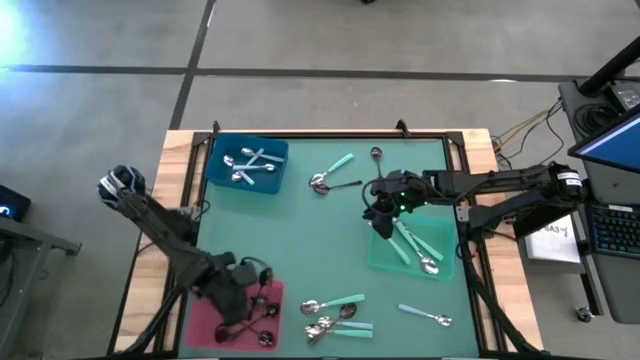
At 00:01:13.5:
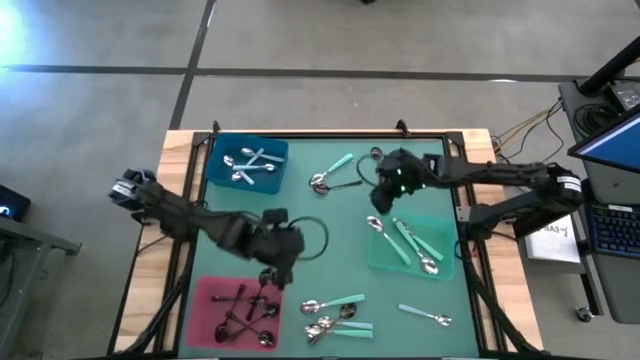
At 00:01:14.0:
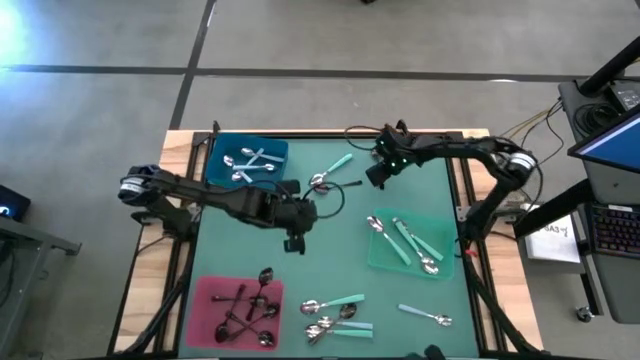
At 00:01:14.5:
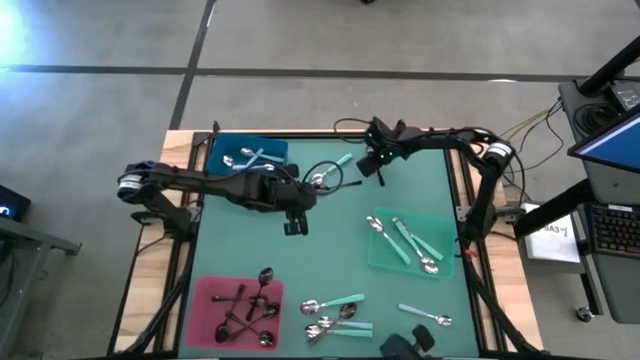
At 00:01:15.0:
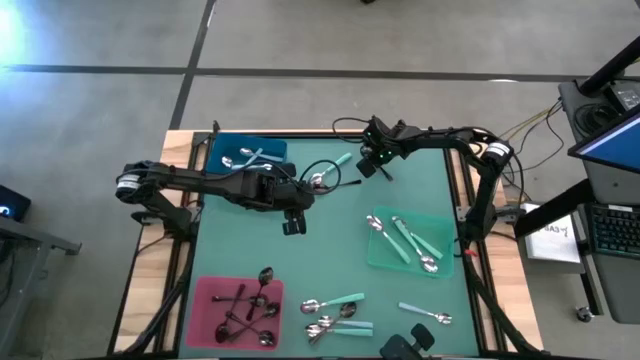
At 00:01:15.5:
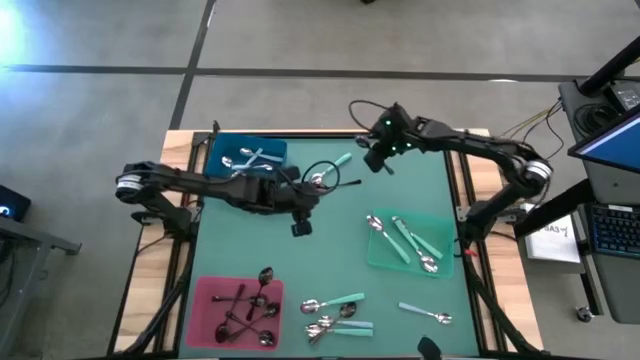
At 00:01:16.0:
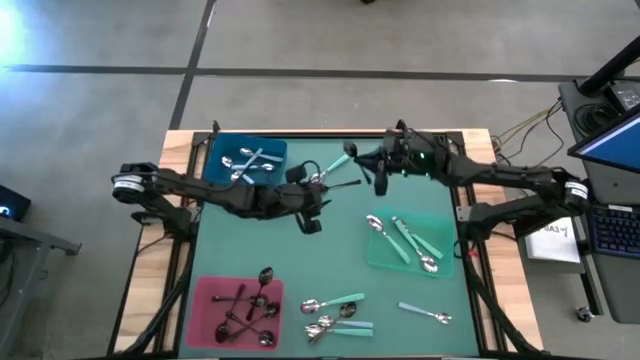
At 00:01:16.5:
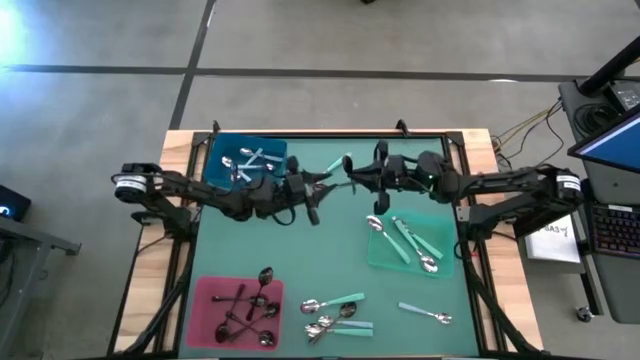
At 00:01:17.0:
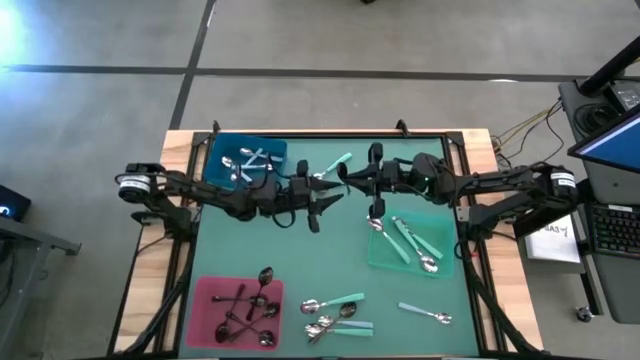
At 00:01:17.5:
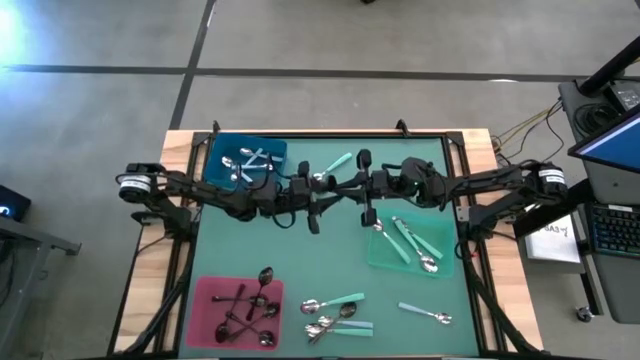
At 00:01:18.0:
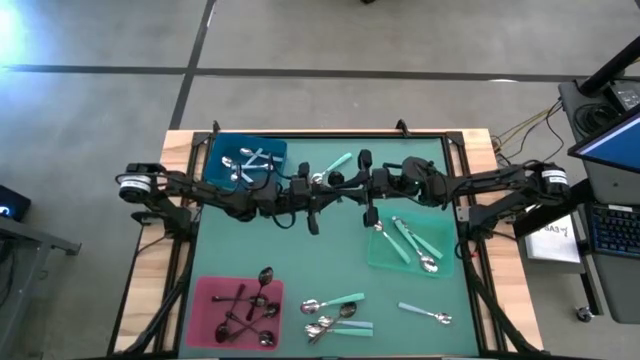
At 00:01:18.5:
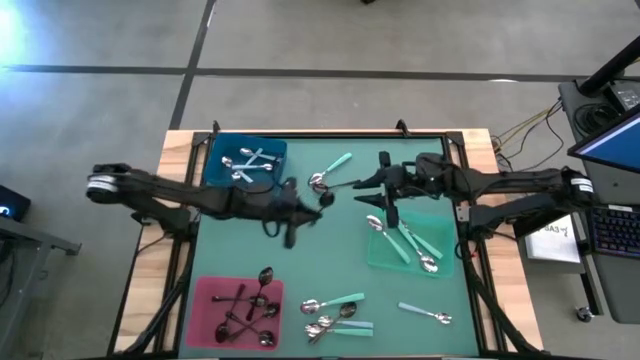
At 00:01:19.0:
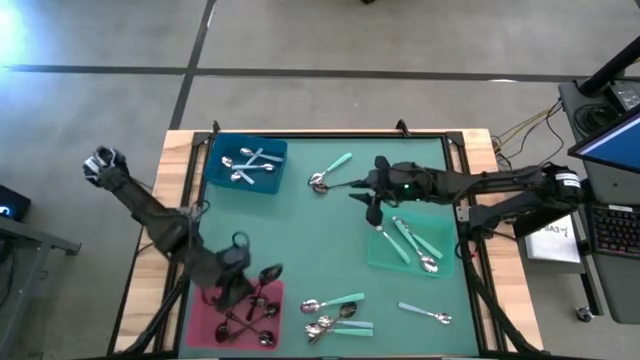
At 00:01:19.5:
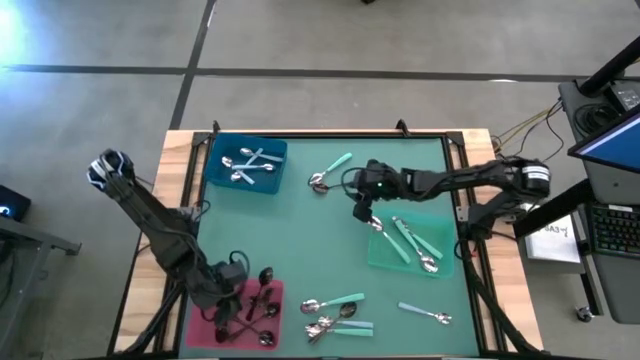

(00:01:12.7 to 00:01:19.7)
Task: Sort silverware by color (type)
Put the top black spoon into the pink bin

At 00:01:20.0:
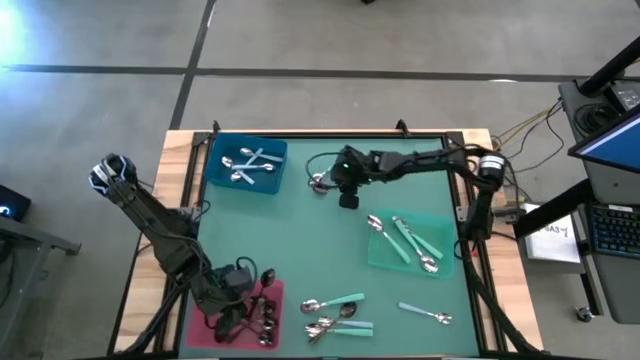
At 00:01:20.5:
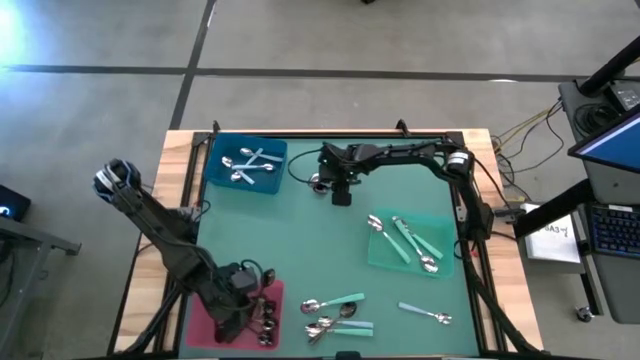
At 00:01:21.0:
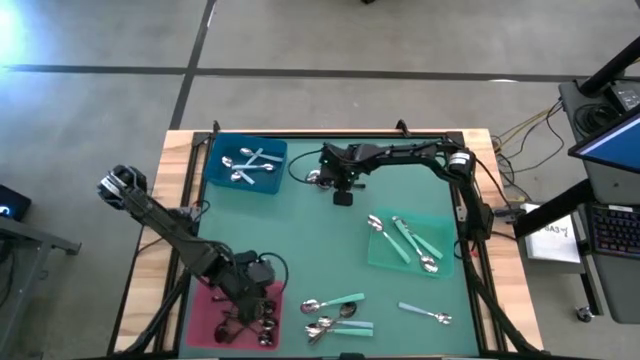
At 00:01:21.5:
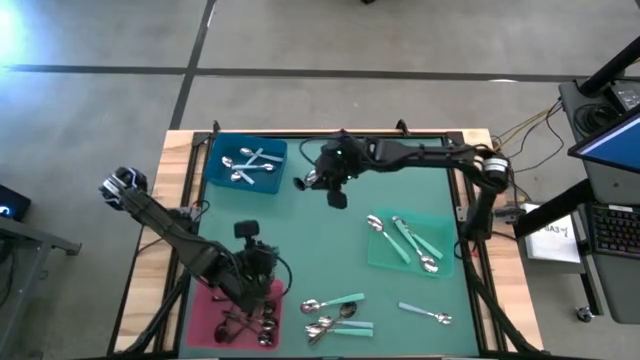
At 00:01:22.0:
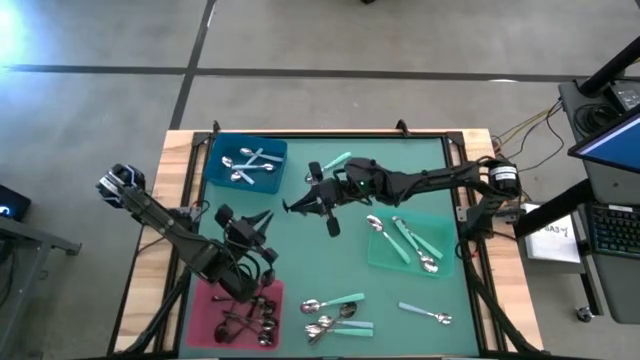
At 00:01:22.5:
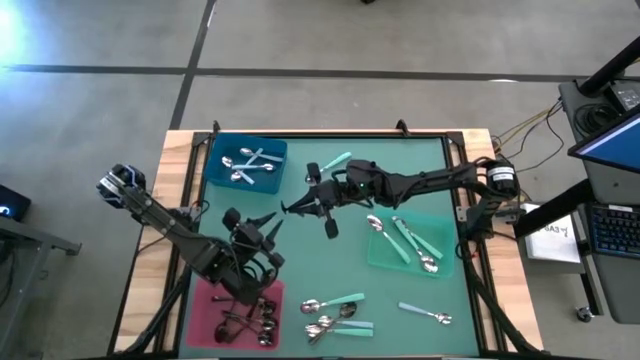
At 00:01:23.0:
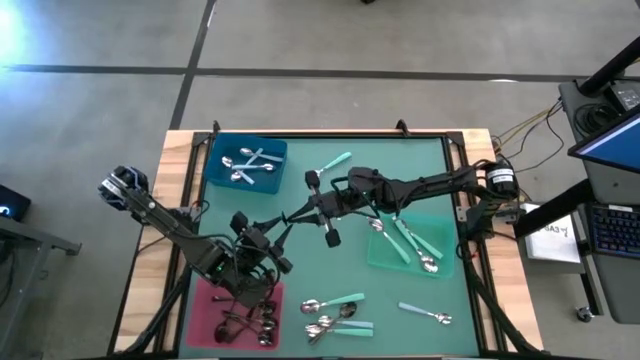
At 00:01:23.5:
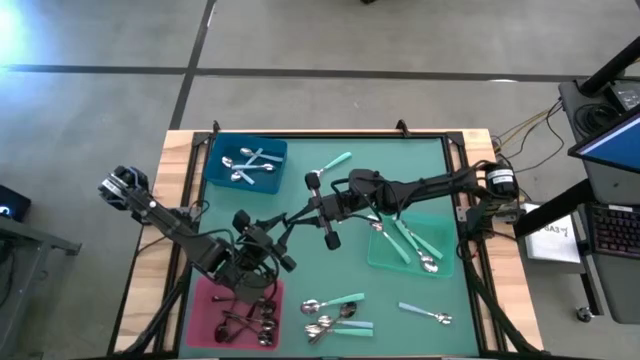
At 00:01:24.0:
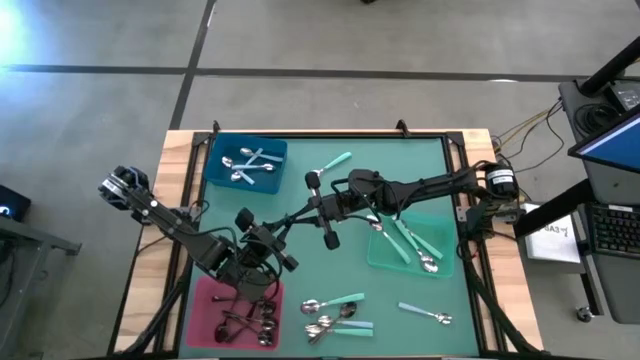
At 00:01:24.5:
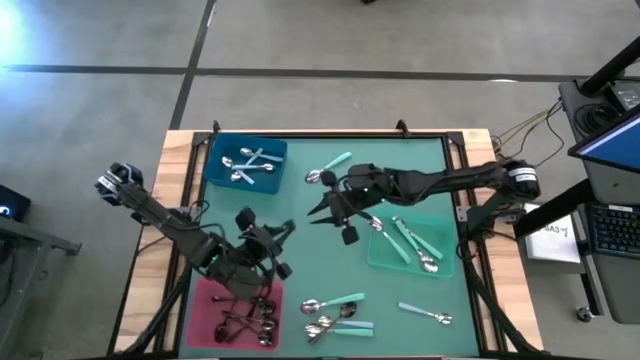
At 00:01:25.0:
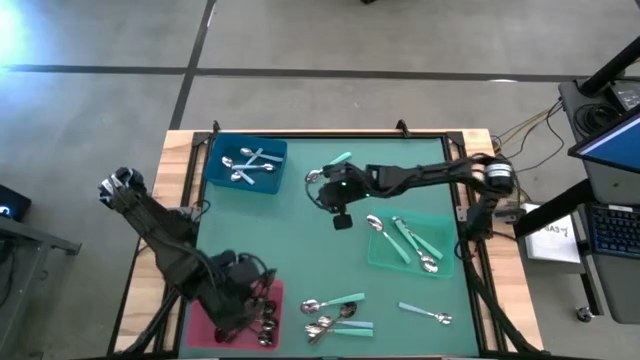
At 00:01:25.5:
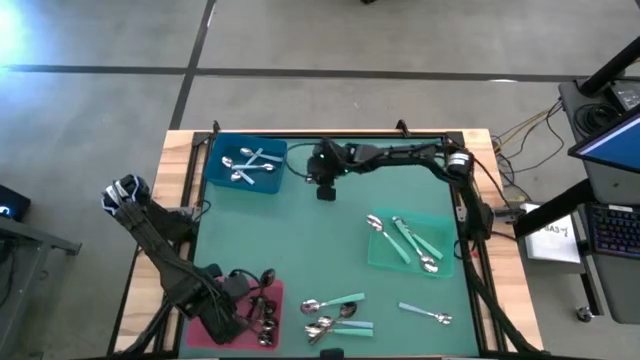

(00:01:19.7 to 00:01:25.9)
Put the top black spoon into the pink bin

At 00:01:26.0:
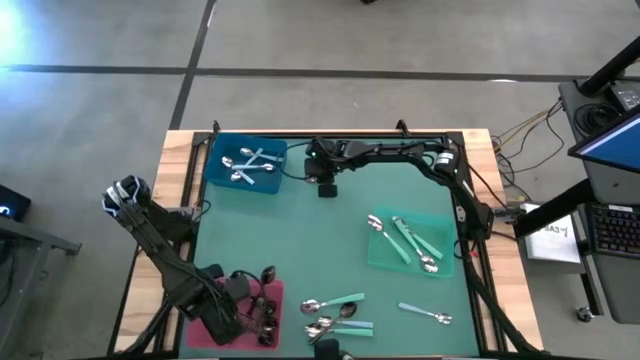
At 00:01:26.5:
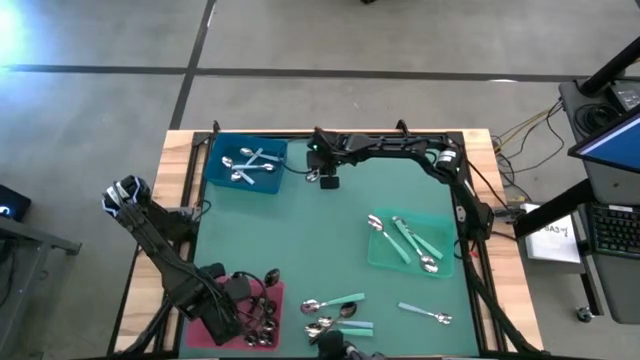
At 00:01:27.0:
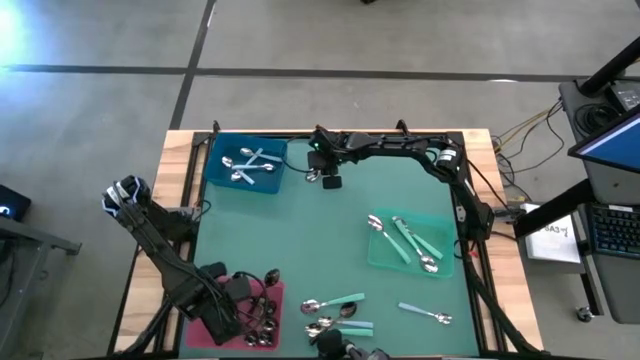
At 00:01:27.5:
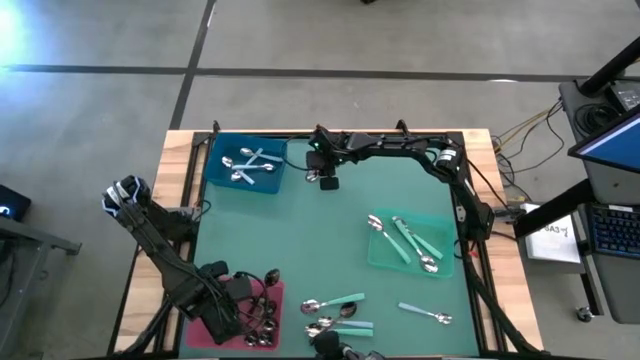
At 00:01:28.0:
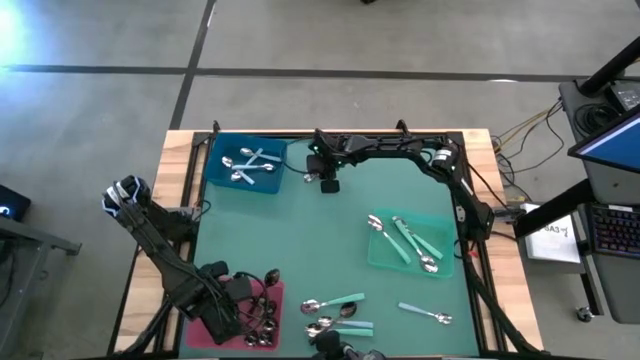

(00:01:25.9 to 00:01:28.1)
Put the green spoon into the blue bin

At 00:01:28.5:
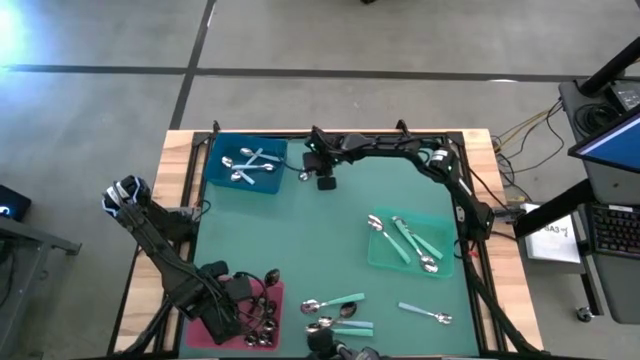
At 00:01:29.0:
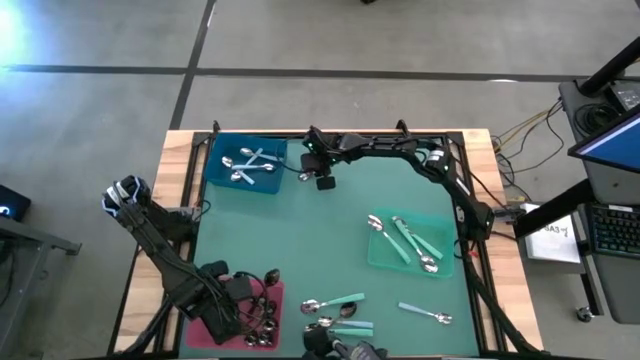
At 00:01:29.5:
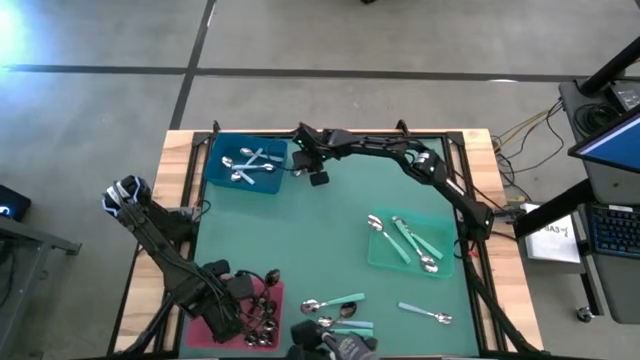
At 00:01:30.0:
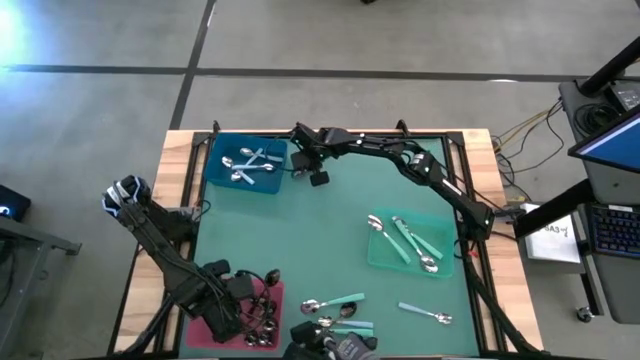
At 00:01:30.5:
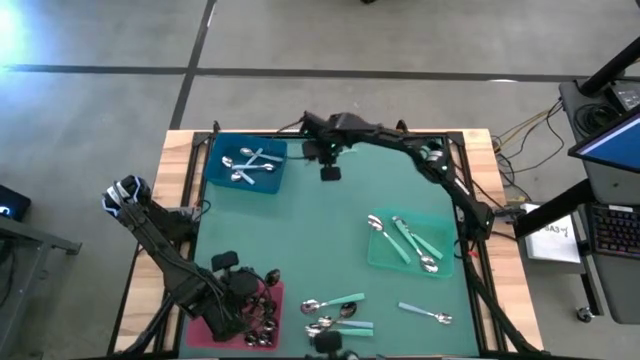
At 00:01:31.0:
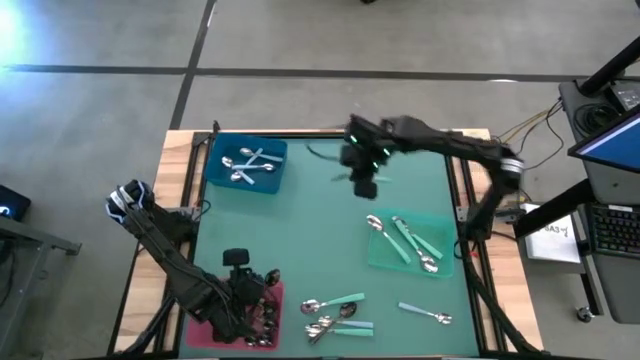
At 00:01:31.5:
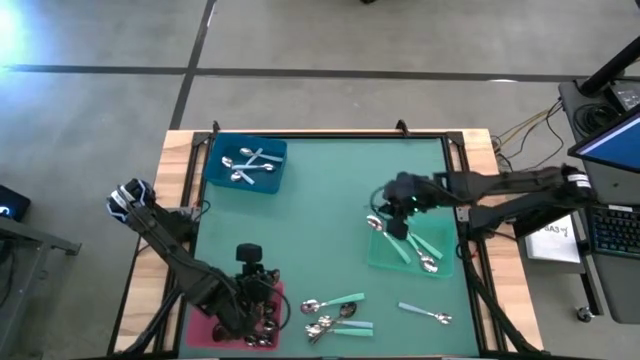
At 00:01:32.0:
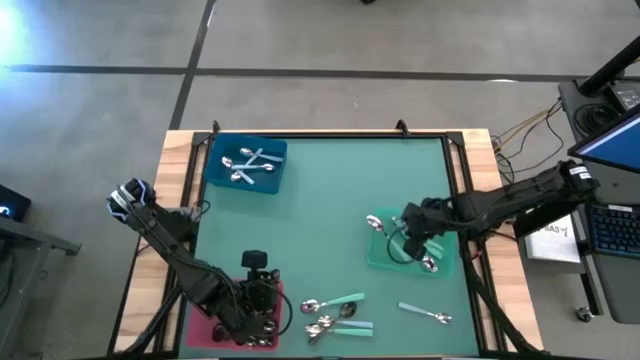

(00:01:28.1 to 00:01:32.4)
Put the top green spoon into the blue bin

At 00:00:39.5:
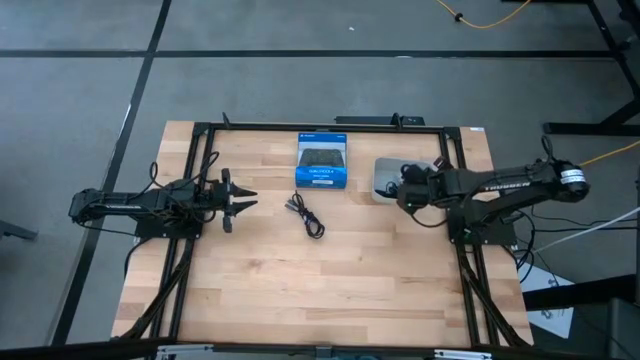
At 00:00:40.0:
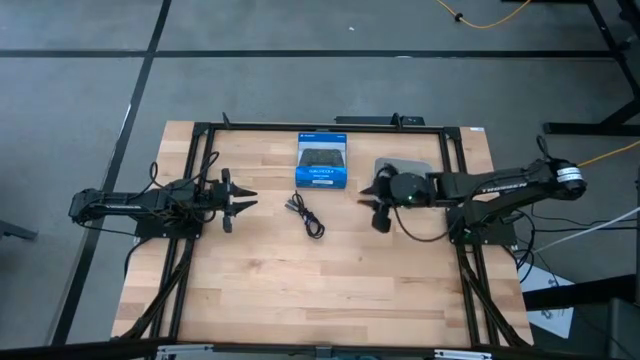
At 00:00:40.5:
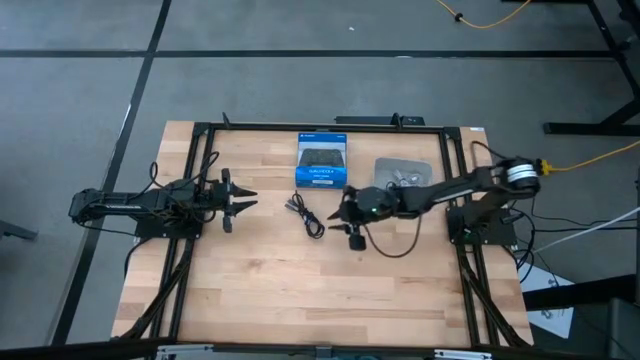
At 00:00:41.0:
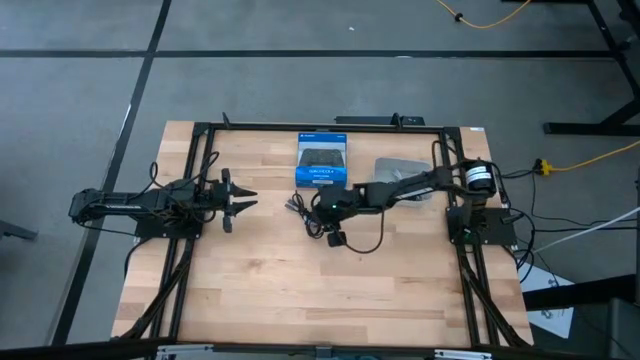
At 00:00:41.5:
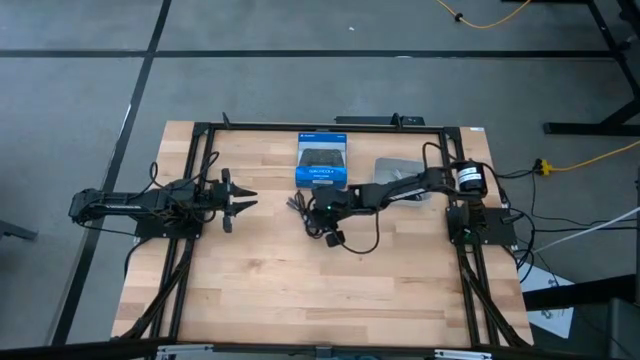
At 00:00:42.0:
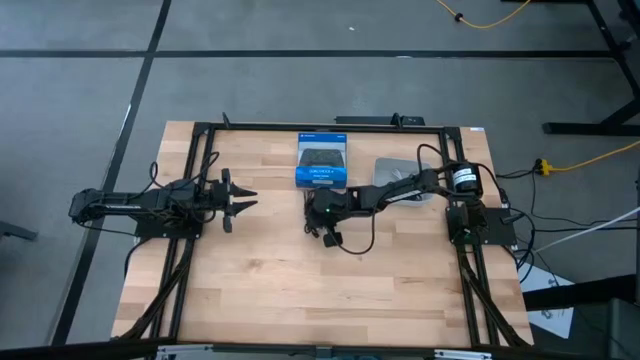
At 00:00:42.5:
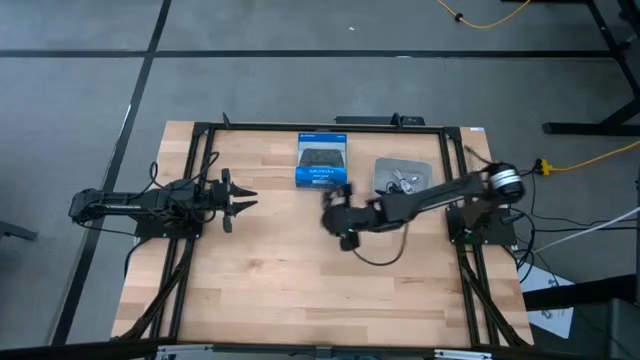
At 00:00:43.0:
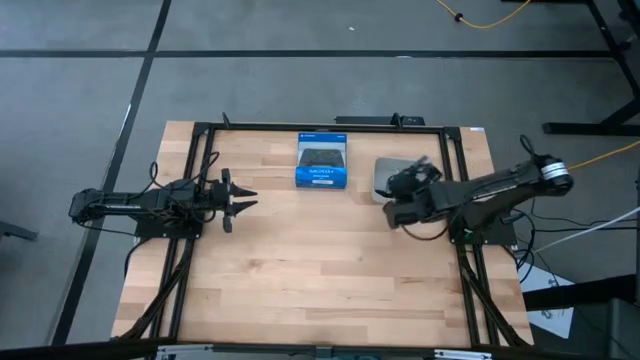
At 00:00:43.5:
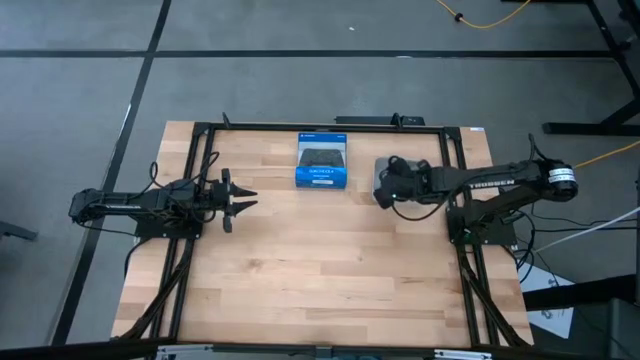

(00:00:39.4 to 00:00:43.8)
Task: Pick and place USB-C Cables
Put the black charger cable into the gray bin
